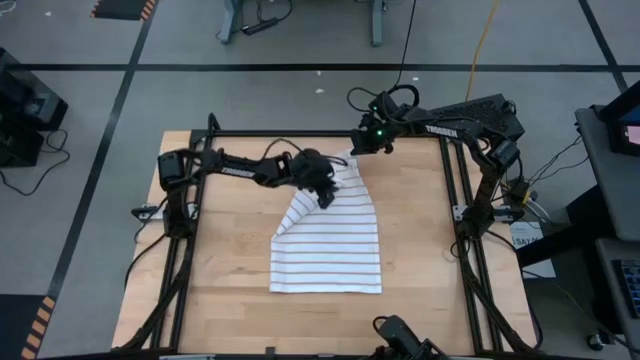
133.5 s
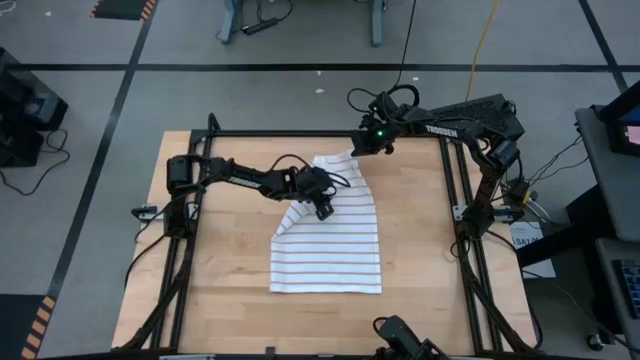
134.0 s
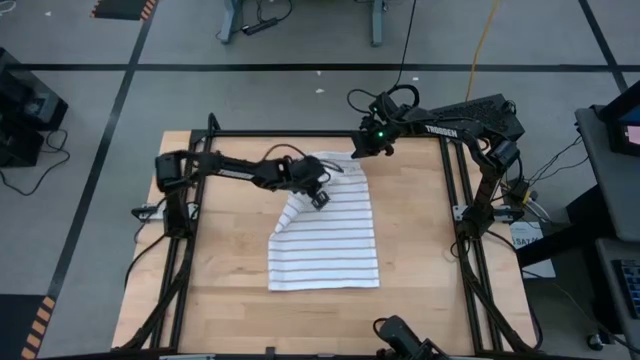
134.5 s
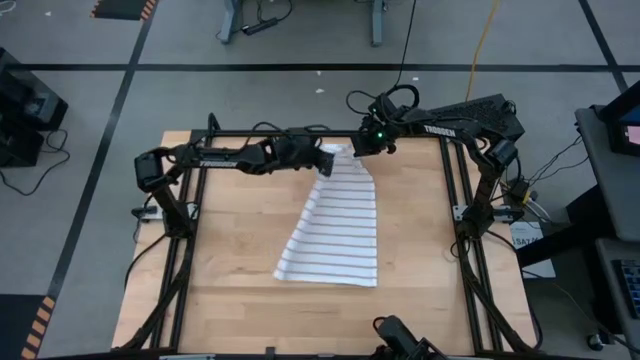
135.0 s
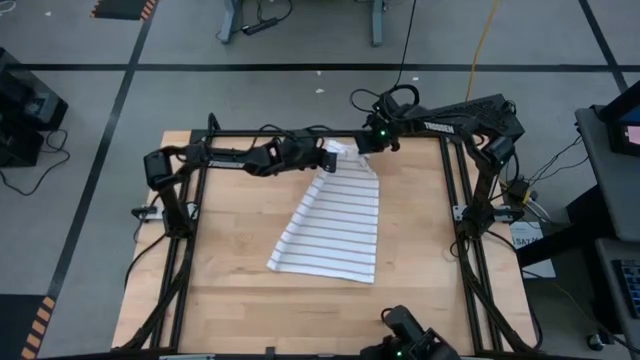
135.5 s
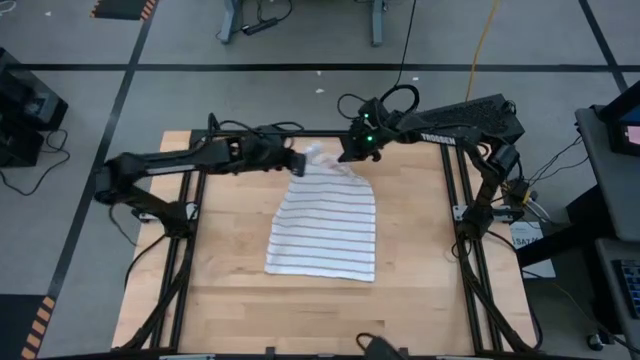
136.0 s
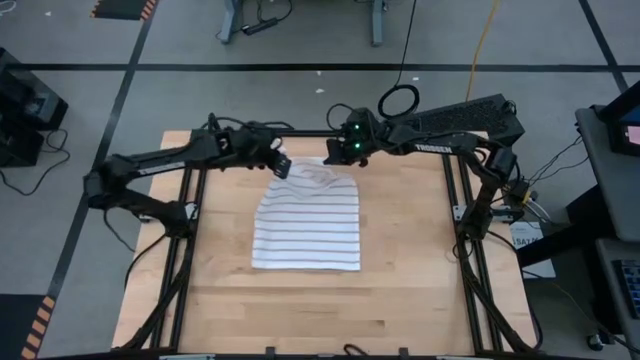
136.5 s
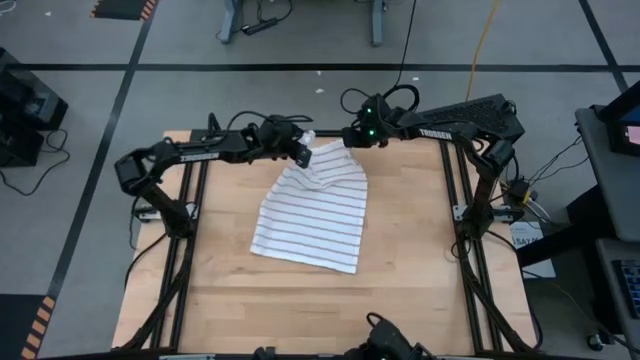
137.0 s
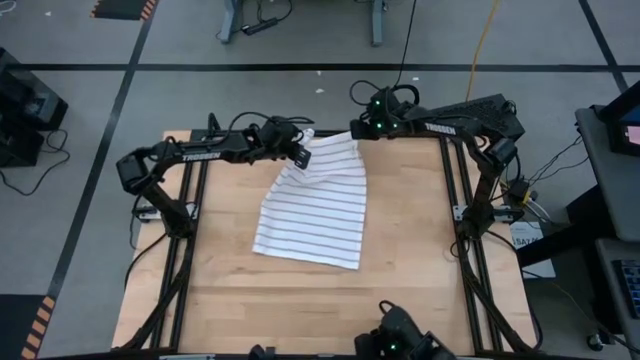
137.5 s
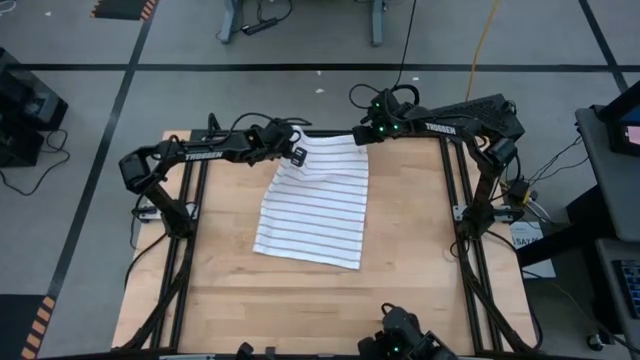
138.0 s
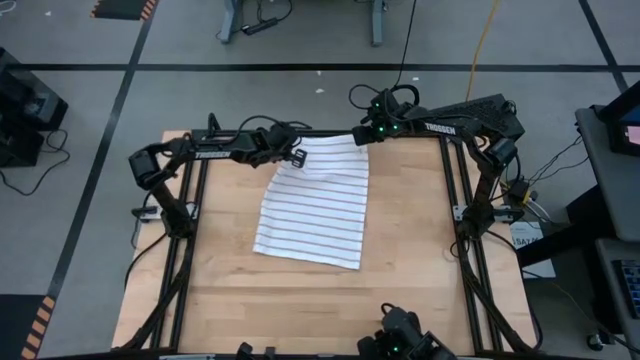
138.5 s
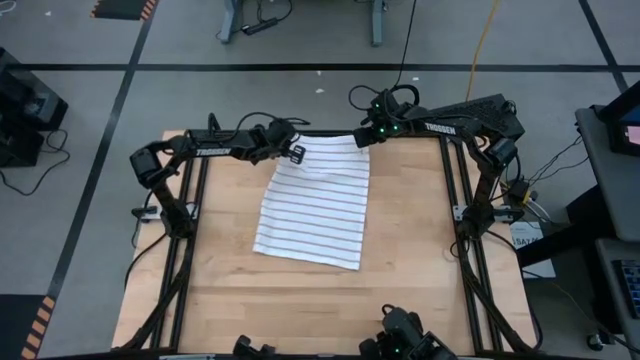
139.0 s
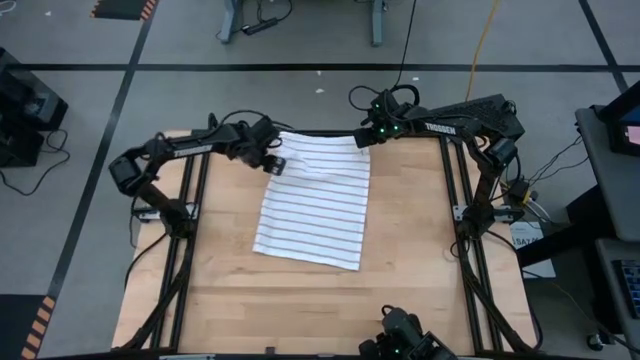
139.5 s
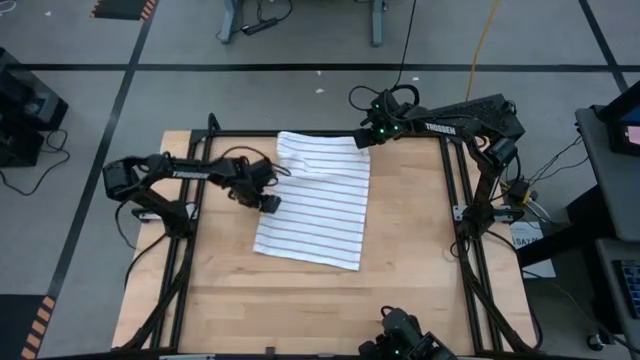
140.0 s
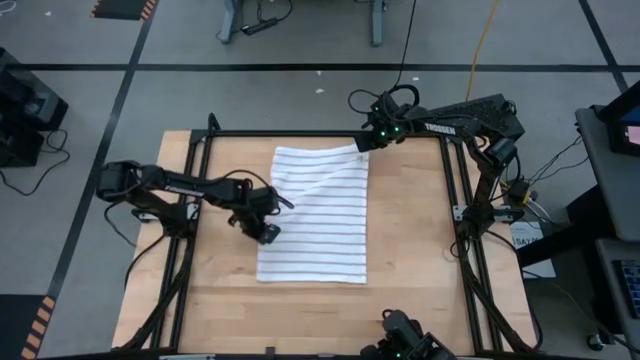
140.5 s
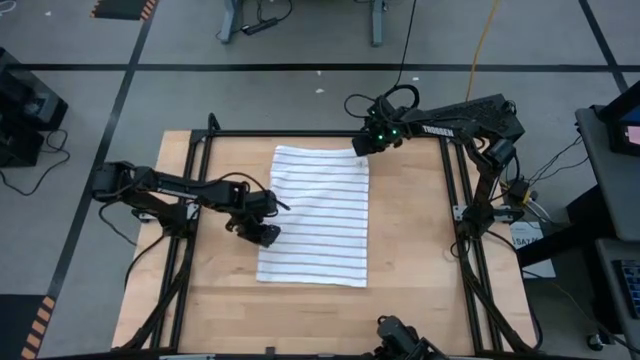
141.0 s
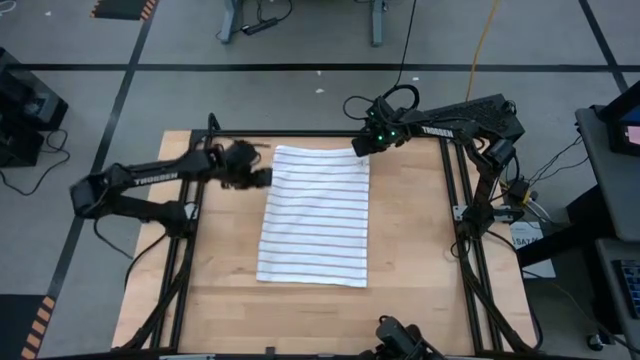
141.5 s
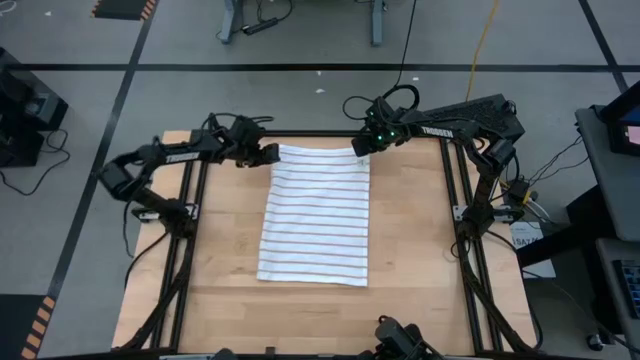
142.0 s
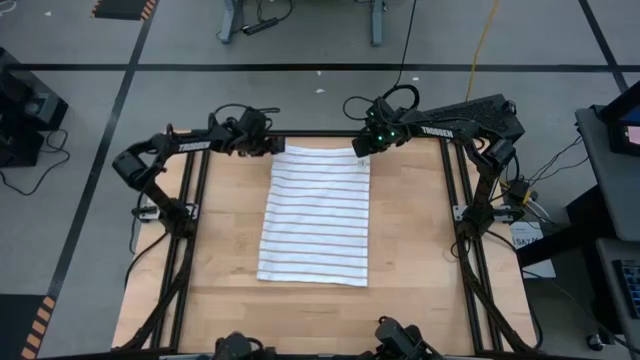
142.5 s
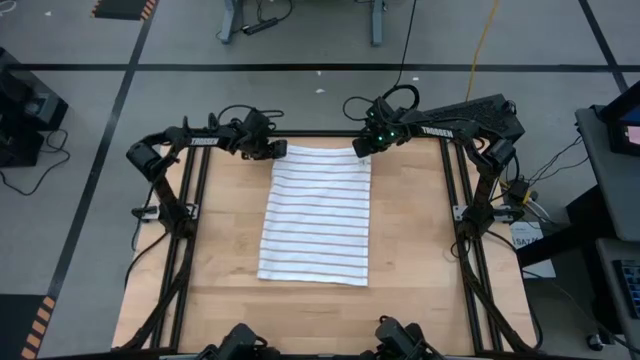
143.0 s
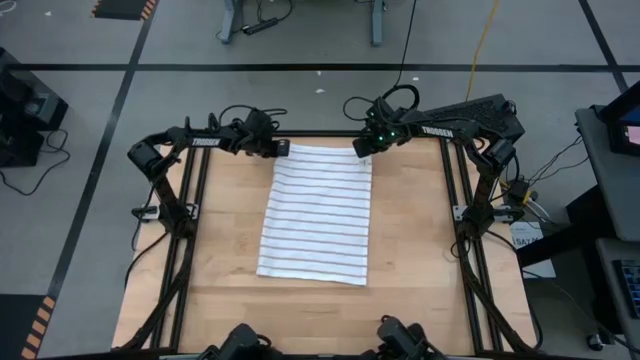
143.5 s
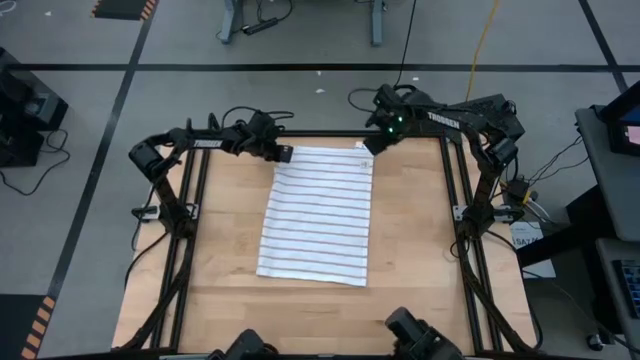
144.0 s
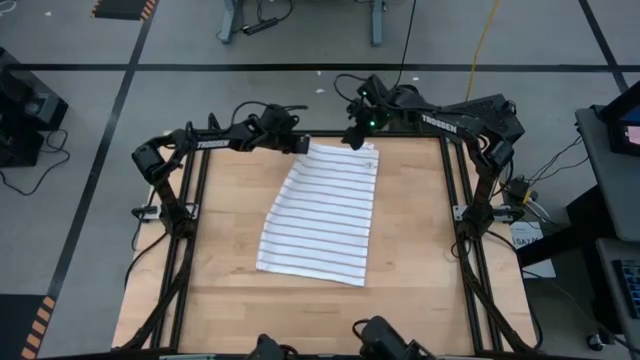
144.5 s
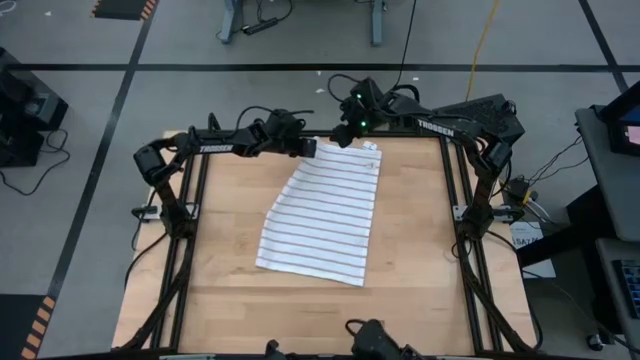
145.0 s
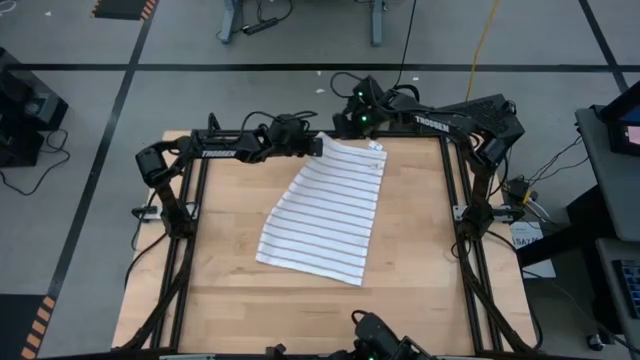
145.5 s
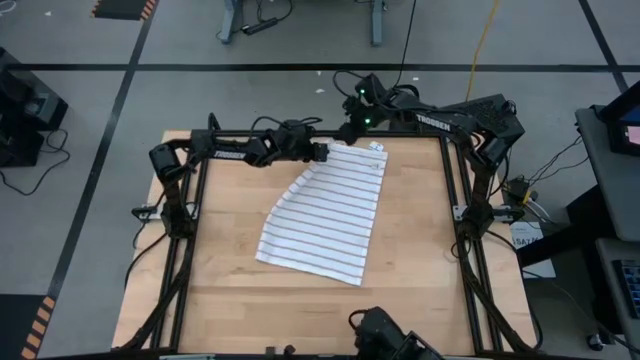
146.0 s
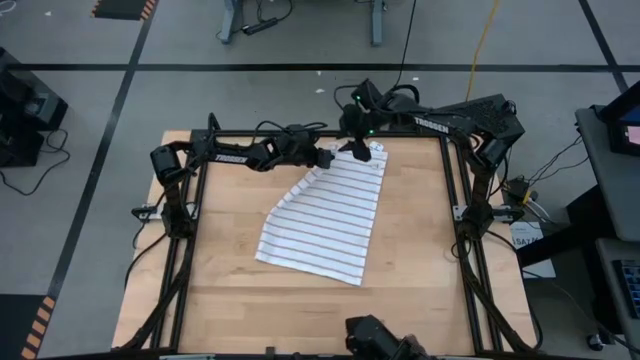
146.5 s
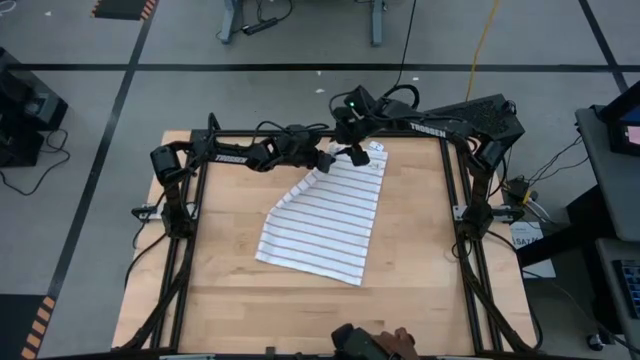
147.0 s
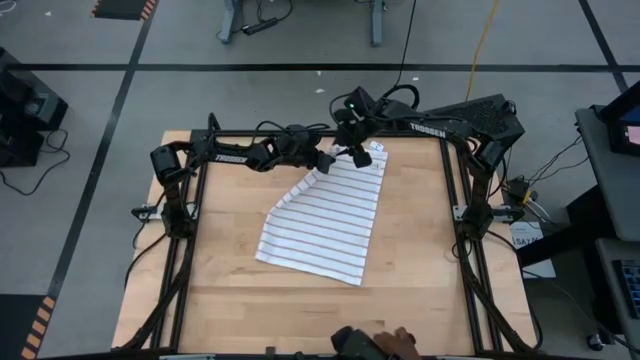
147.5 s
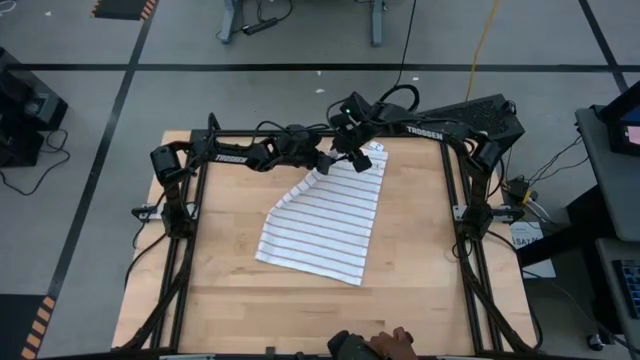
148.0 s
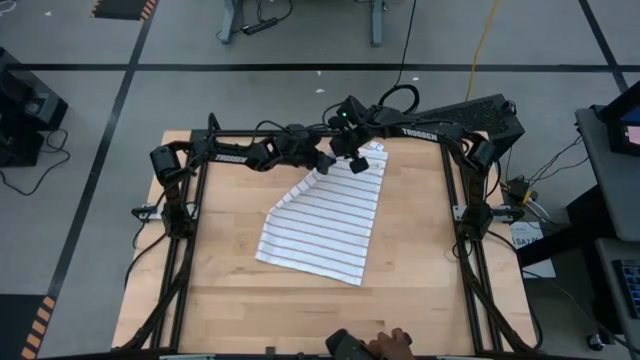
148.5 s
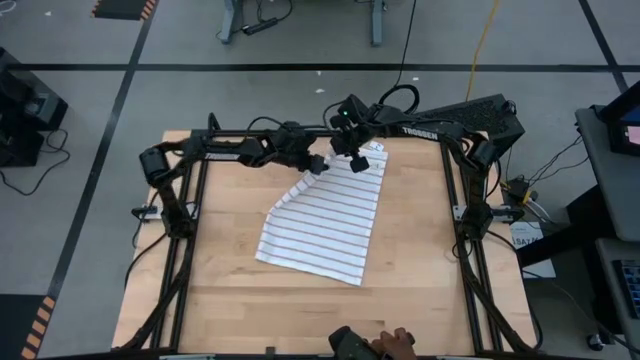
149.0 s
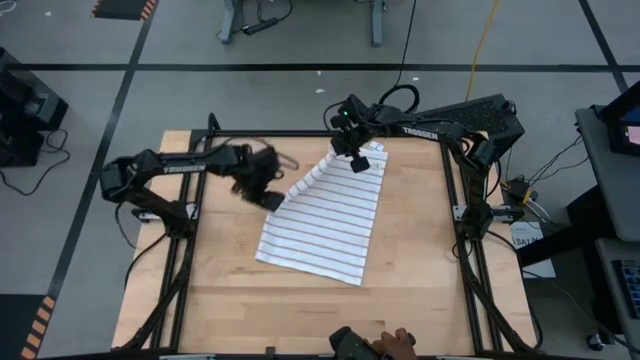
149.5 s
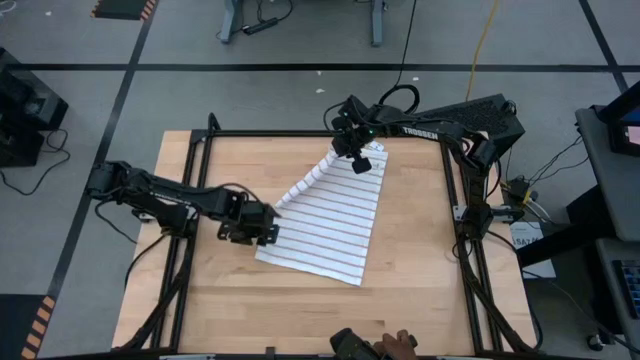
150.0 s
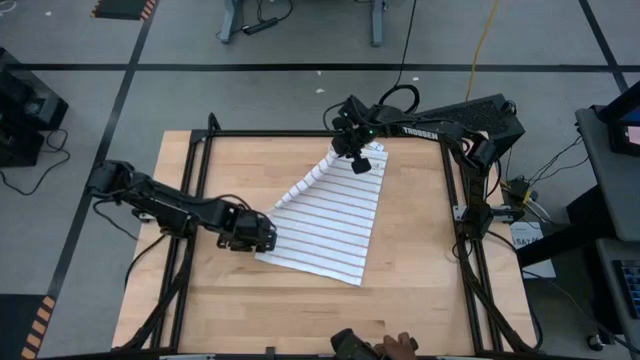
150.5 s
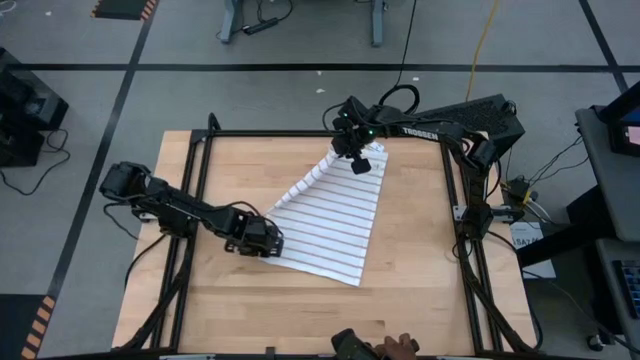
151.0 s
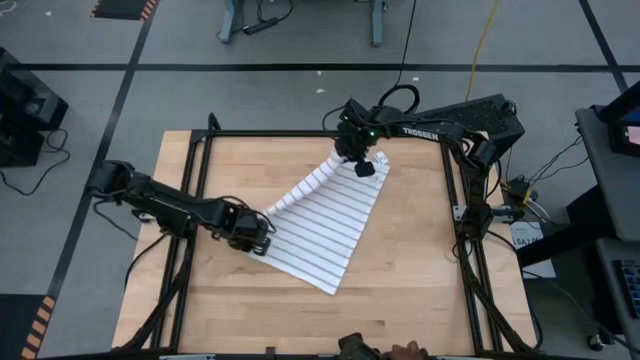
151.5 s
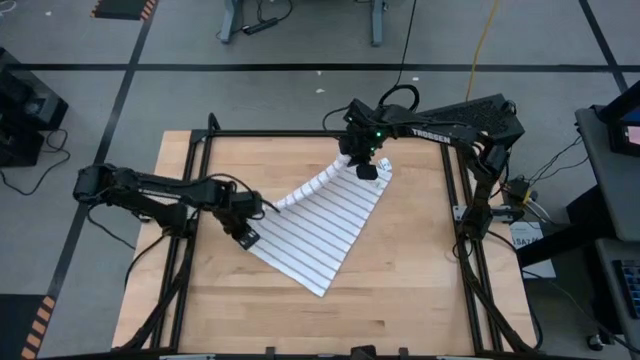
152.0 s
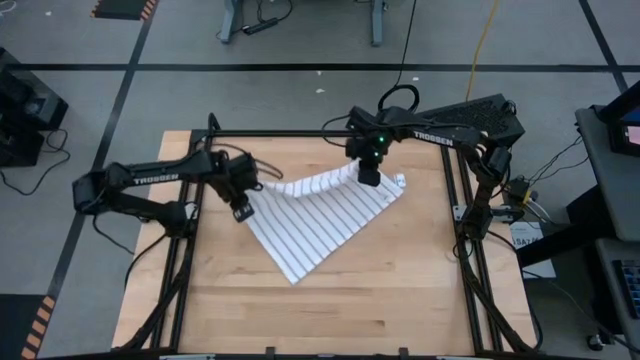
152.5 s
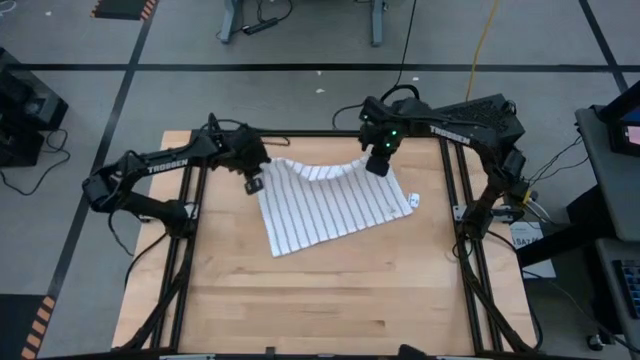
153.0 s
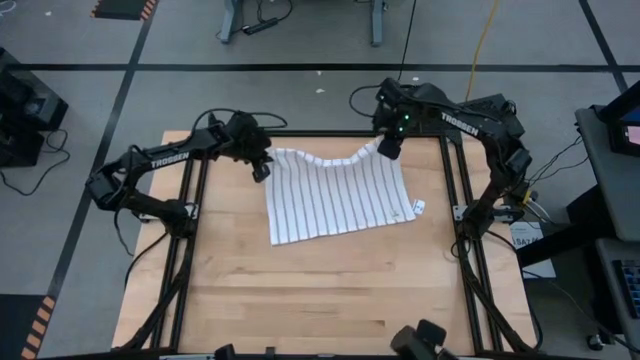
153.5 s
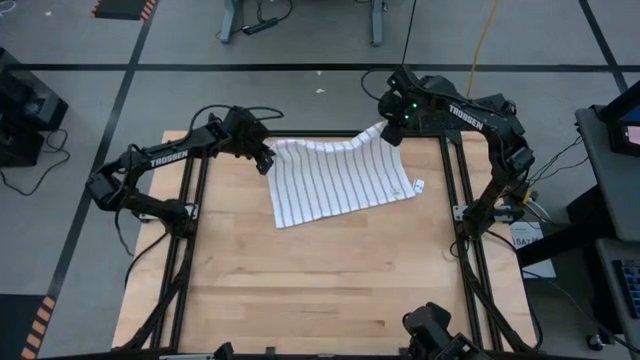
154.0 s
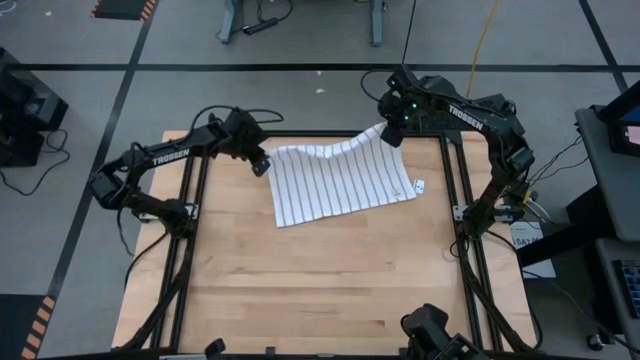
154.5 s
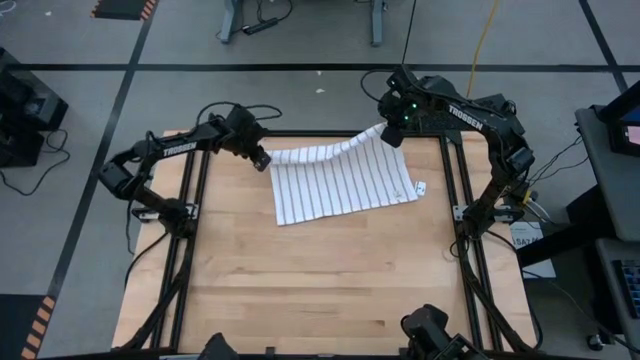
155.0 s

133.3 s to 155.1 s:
Task: Roll towel
Roll the white towel
